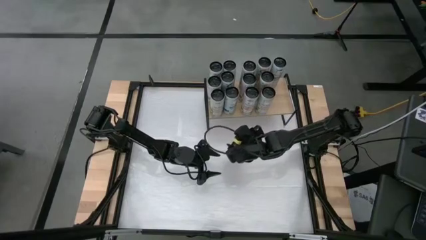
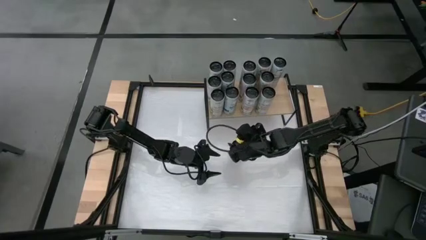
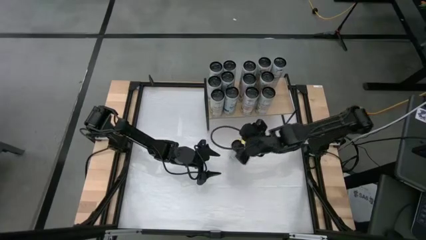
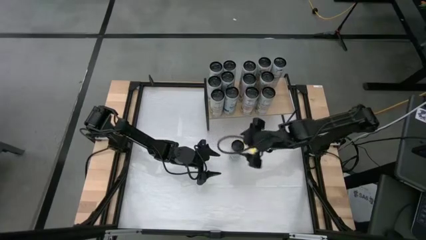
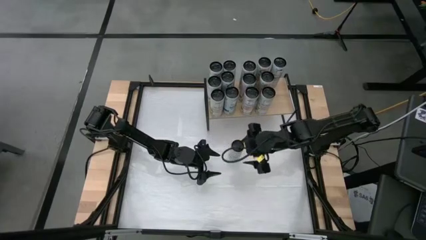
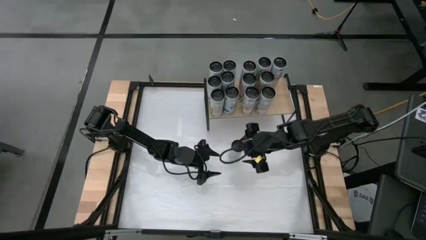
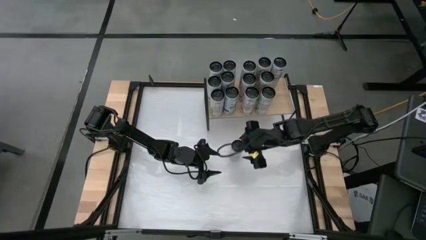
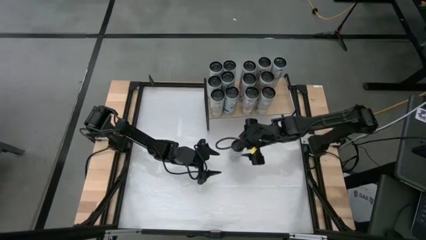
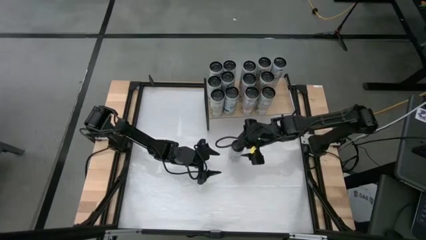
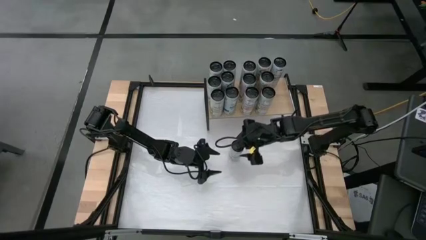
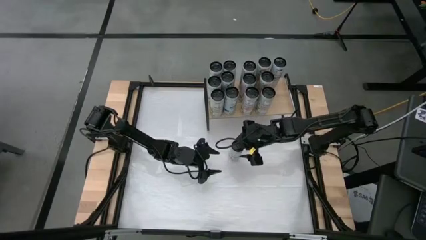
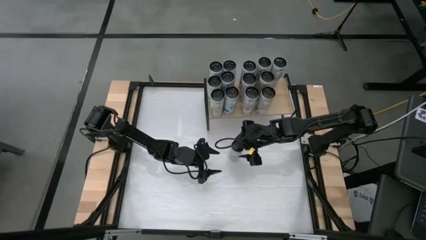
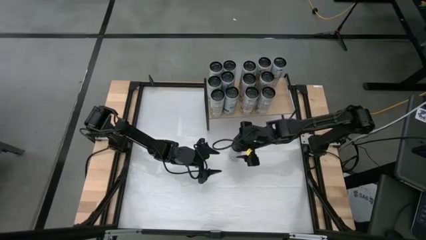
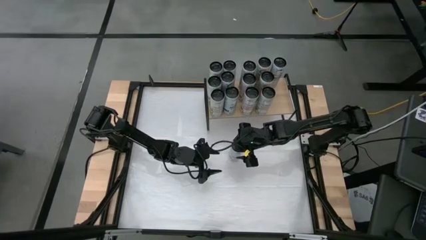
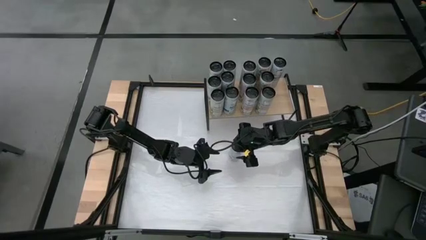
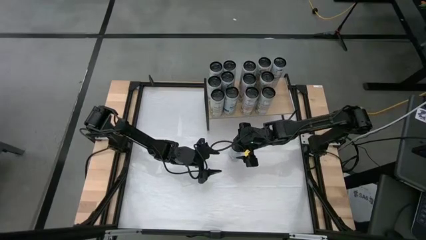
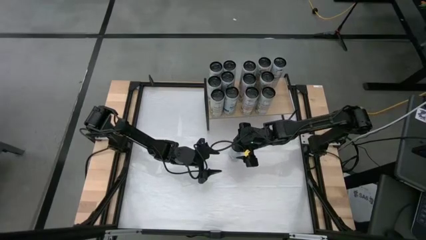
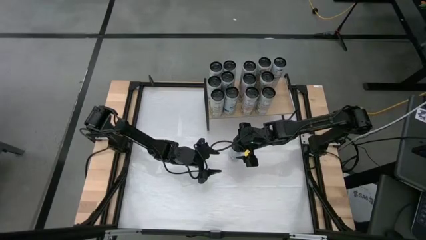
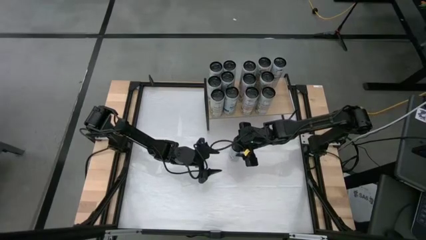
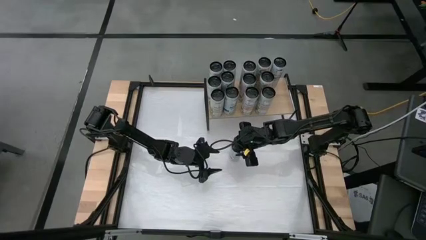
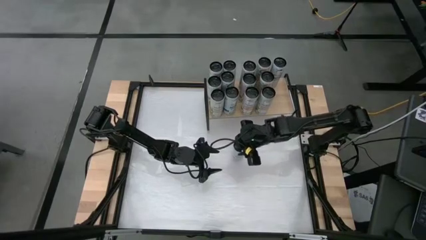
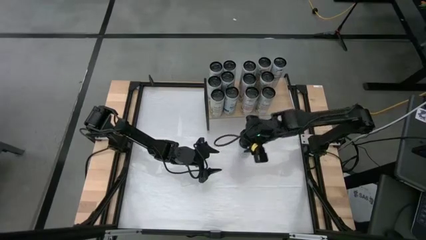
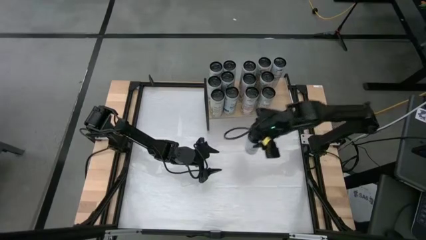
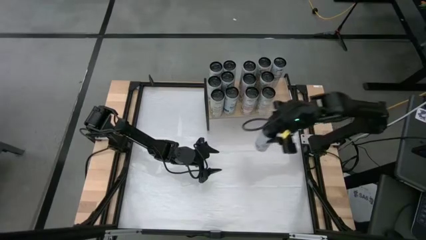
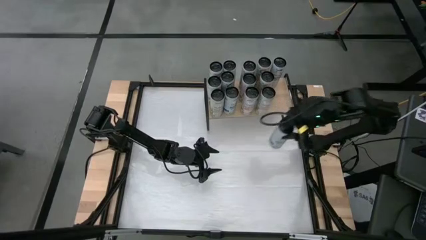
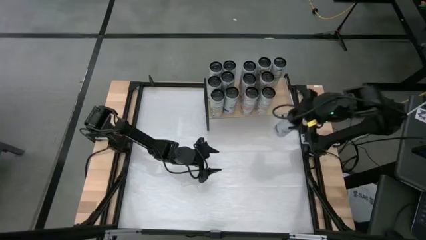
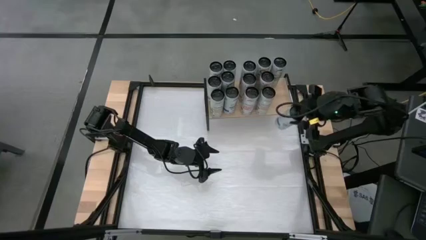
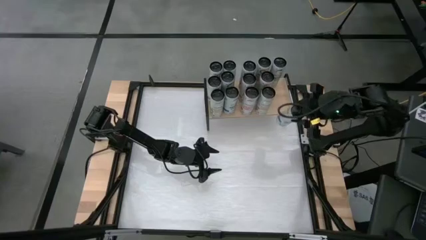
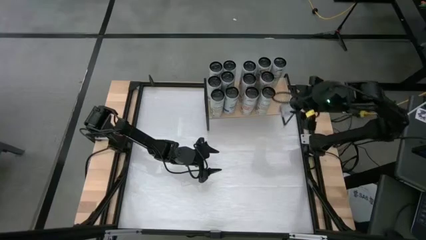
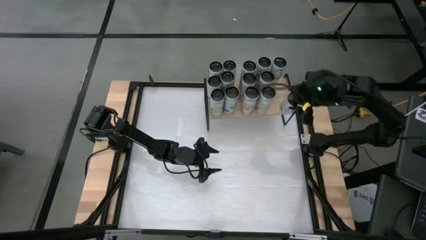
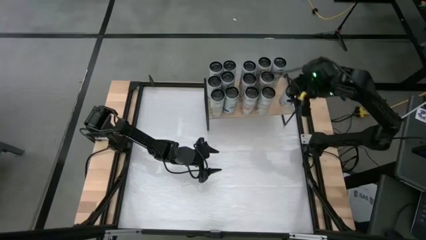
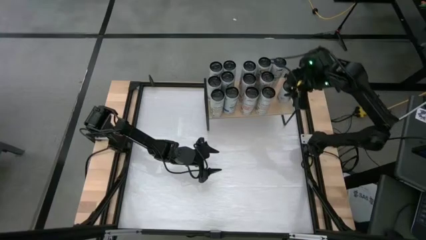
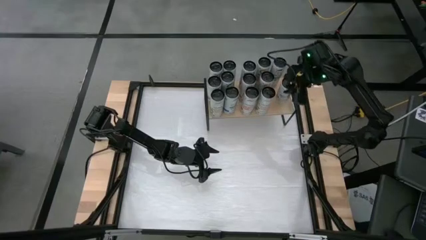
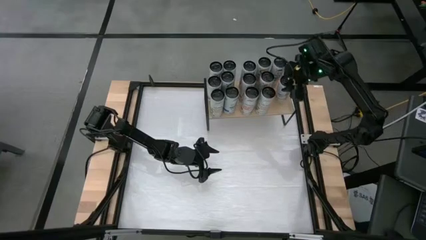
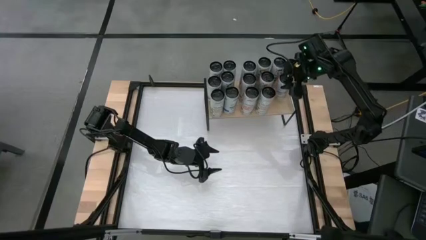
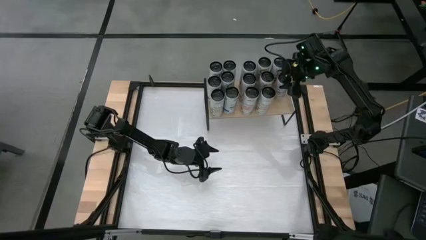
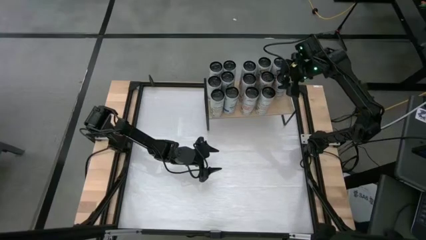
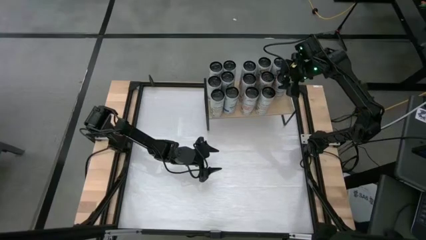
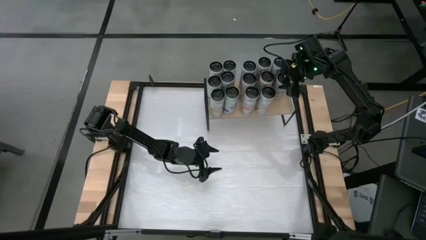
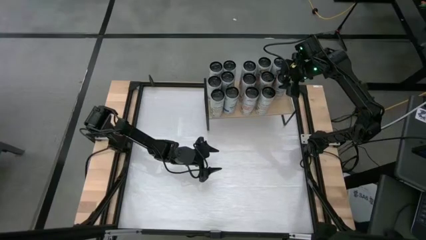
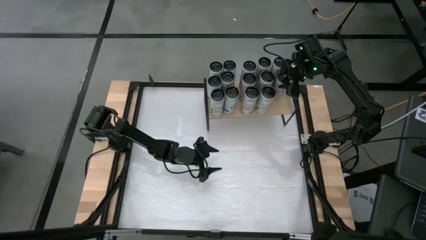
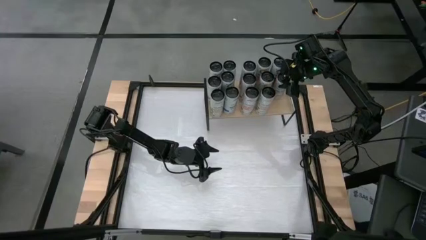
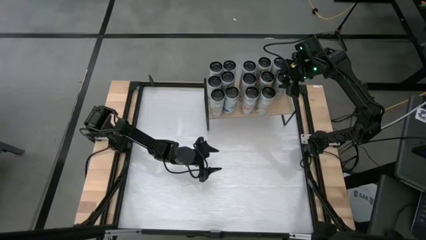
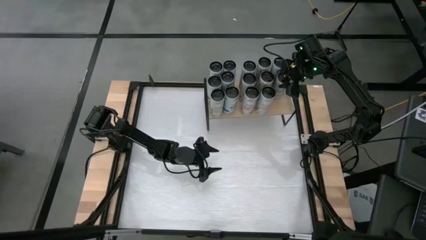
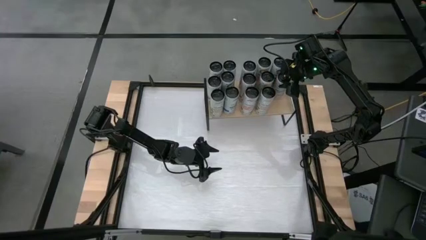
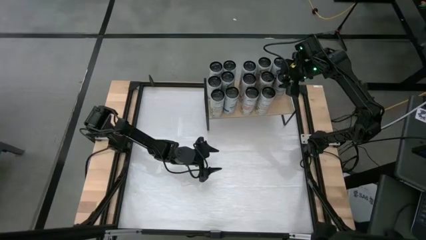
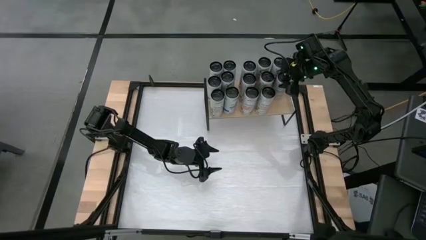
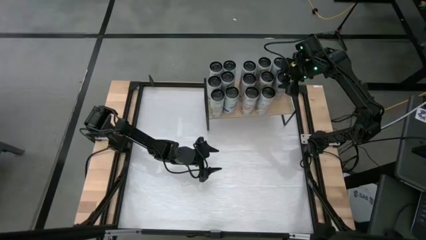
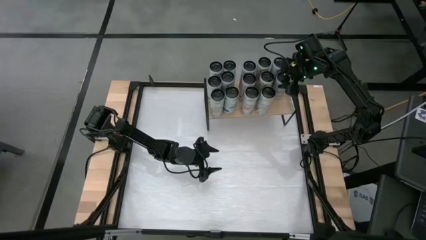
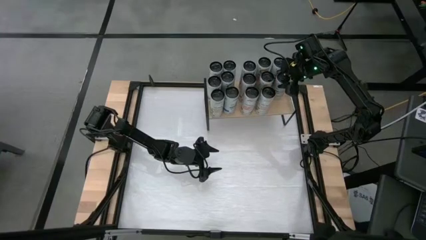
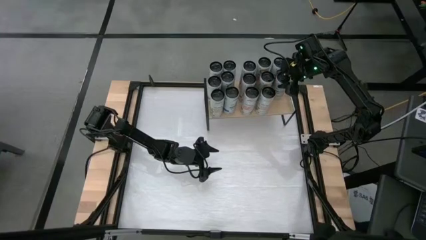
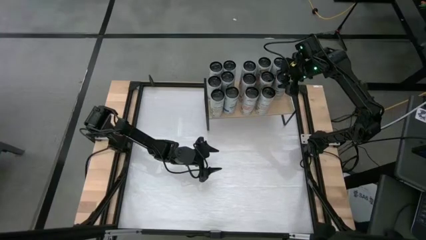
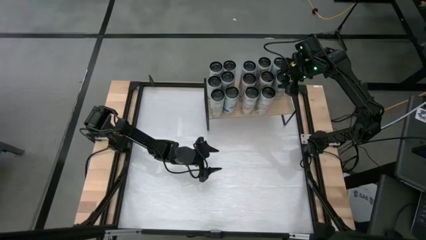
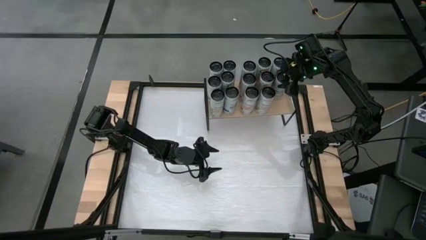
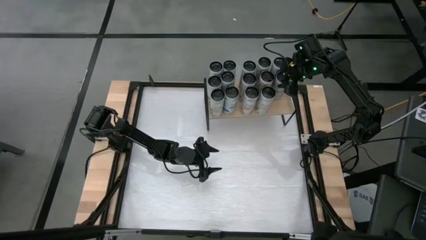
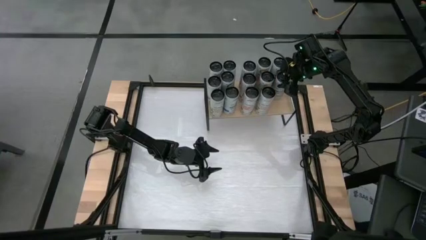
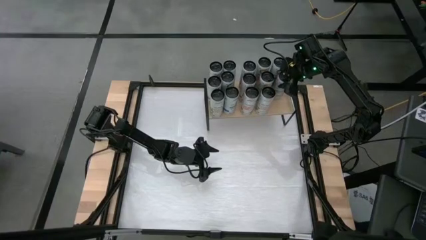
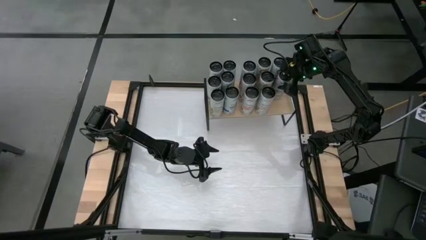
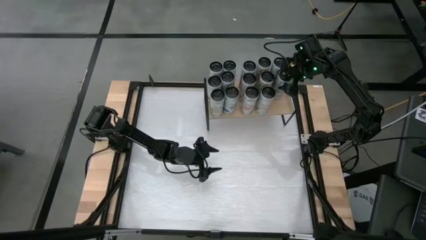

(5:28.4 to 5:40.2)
Task: Place canned beverage on shelf
Put the blue soda can on the shelf aligned with the blue soda can

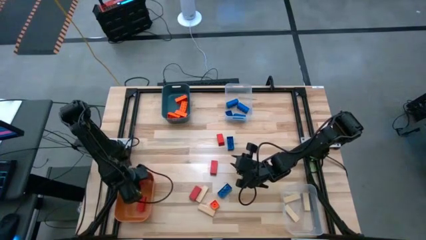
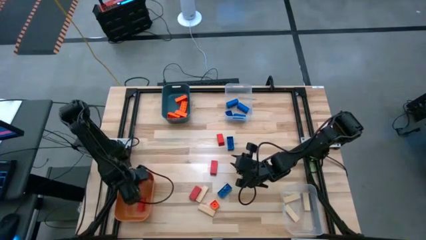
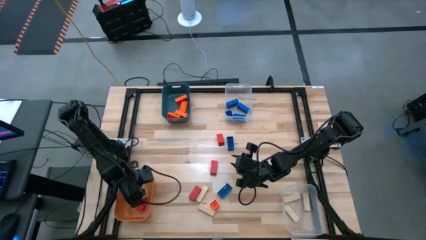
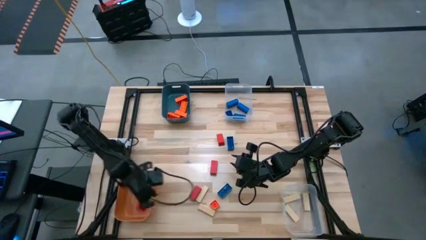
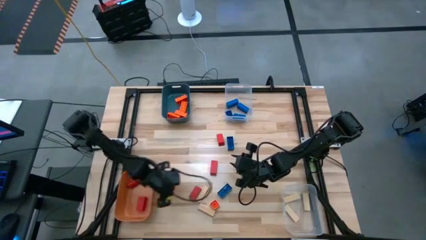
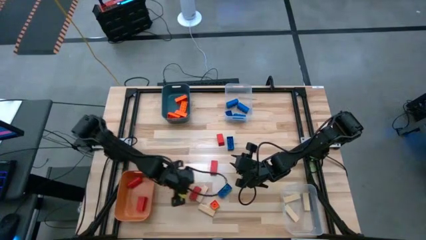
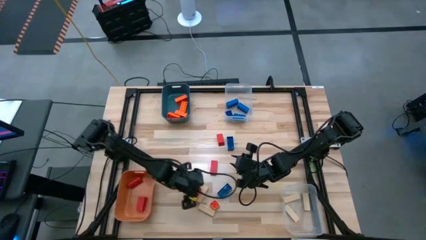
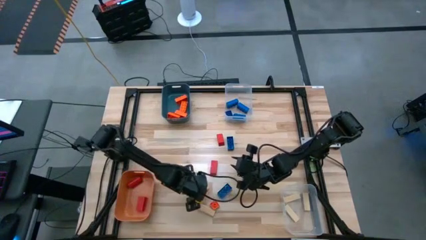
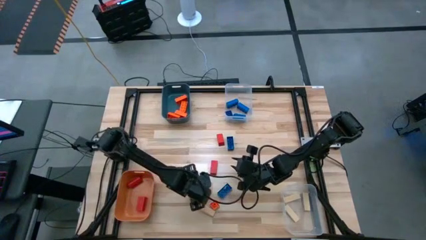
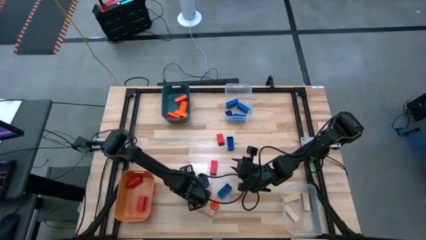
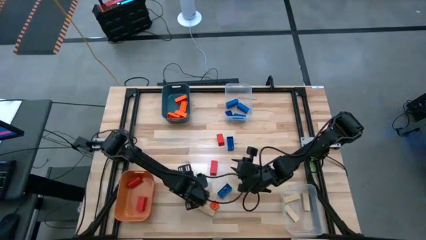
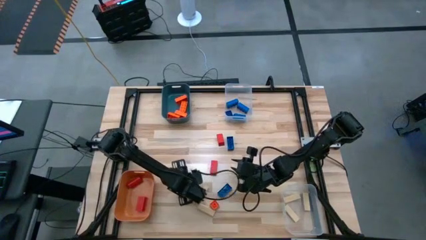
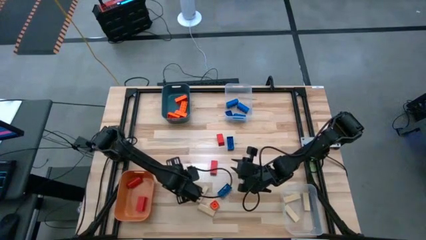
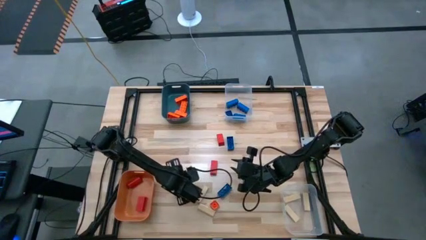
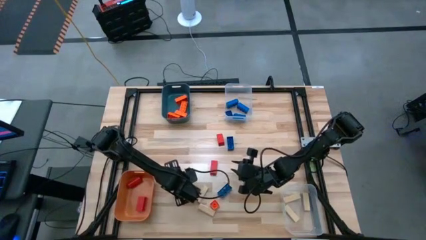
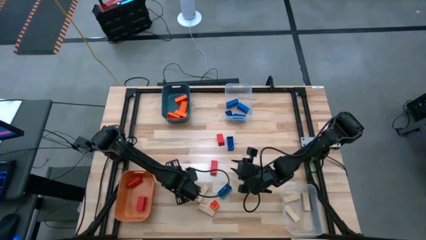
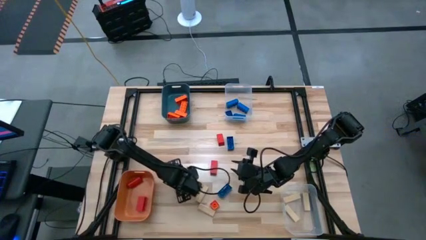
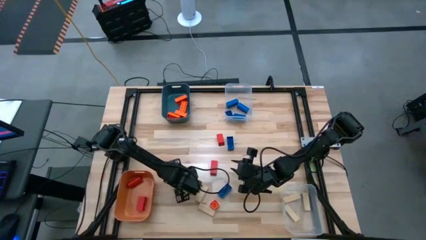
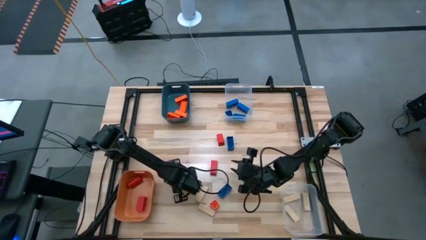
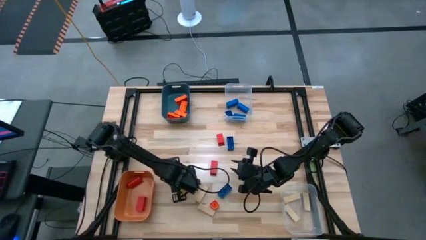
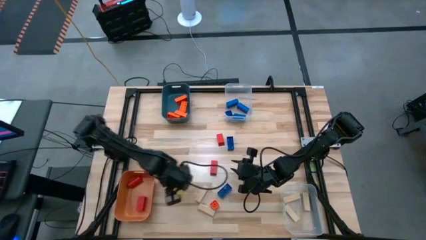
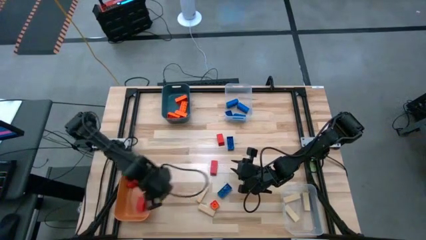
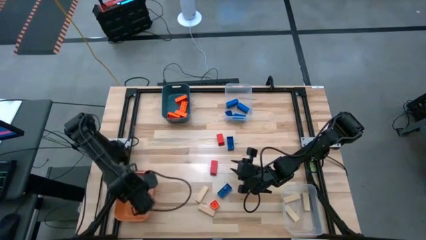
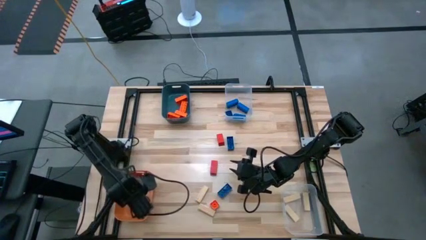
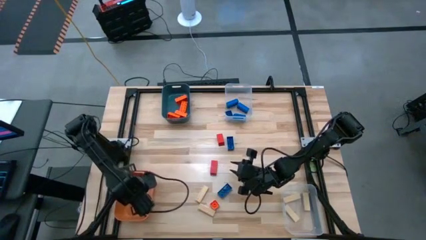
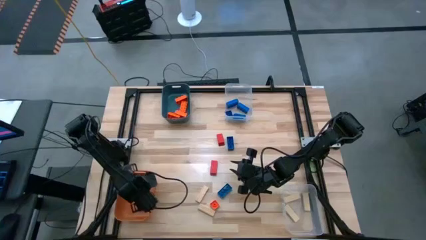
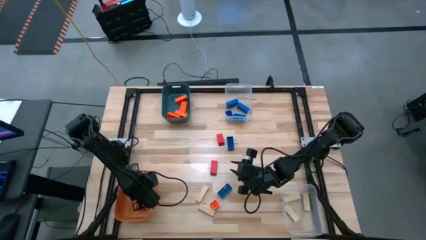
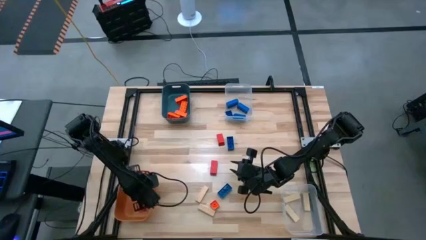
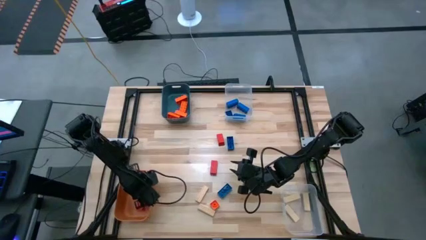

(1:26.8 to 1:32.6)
Task: Sort blocks
Put the red block into the orange bin
